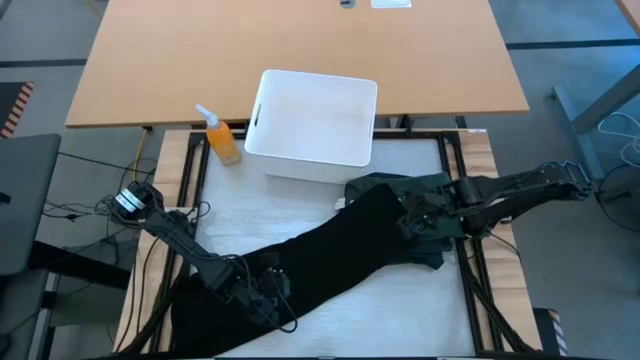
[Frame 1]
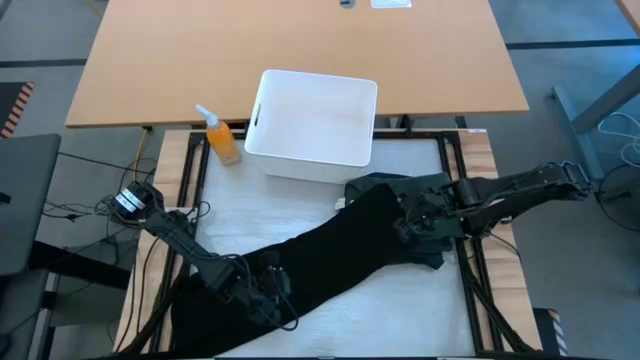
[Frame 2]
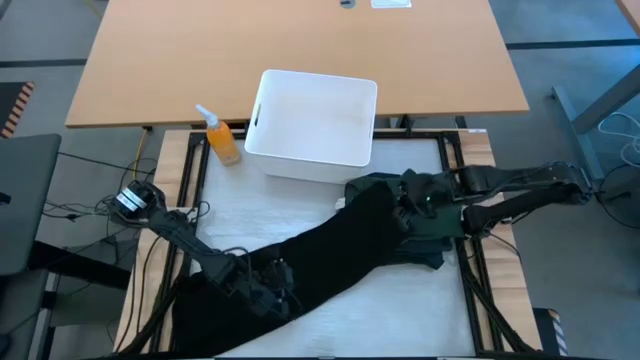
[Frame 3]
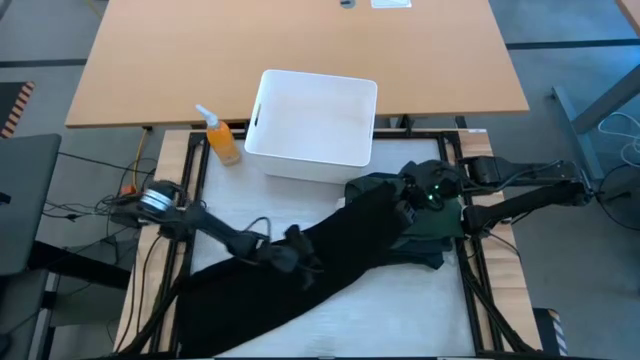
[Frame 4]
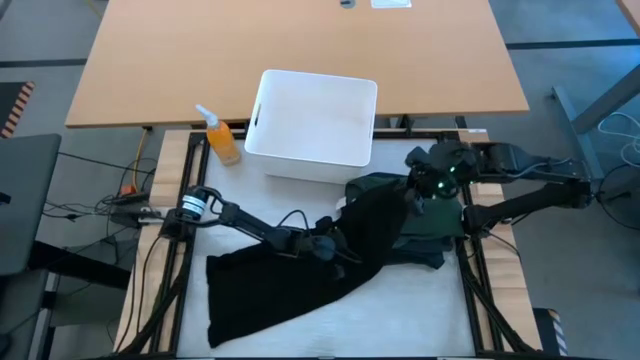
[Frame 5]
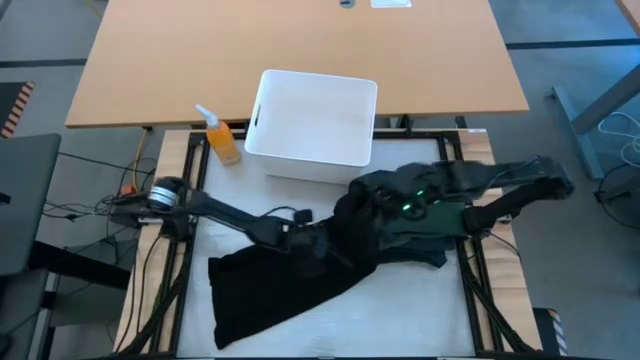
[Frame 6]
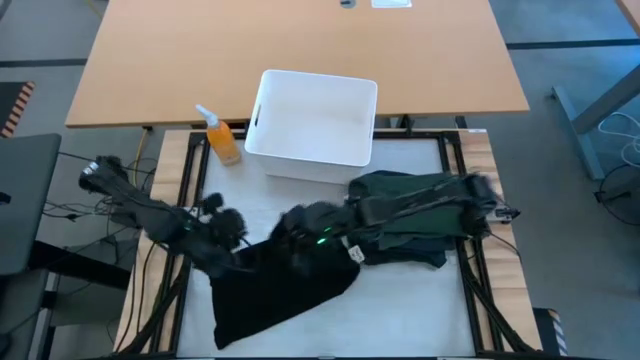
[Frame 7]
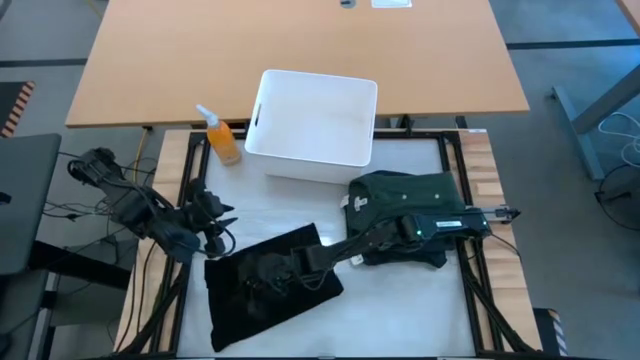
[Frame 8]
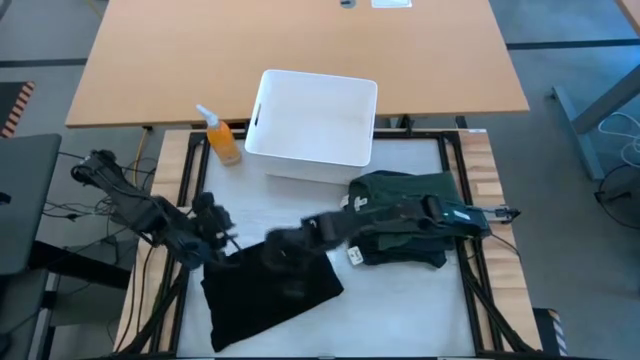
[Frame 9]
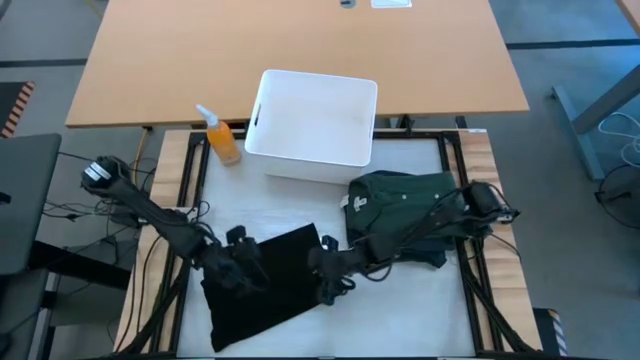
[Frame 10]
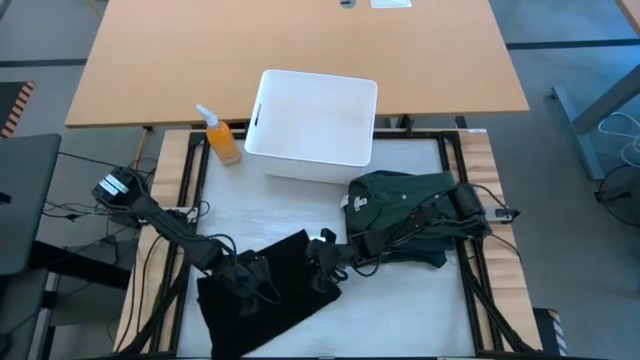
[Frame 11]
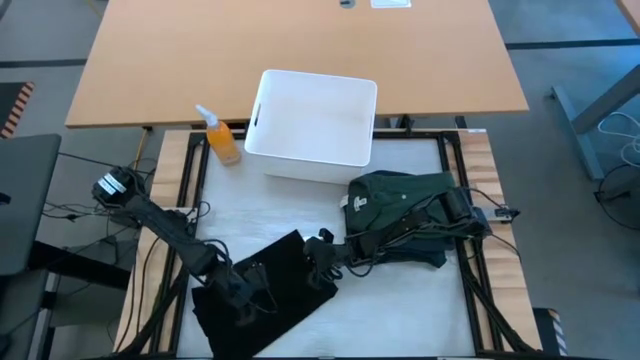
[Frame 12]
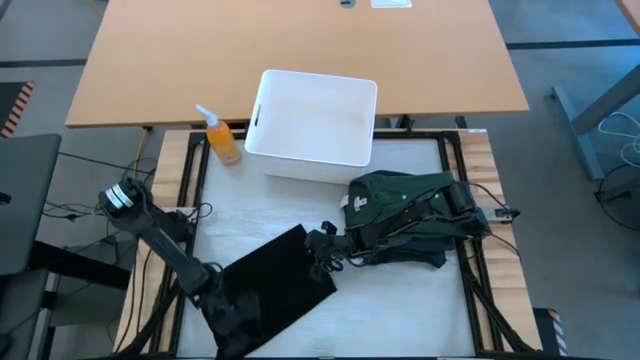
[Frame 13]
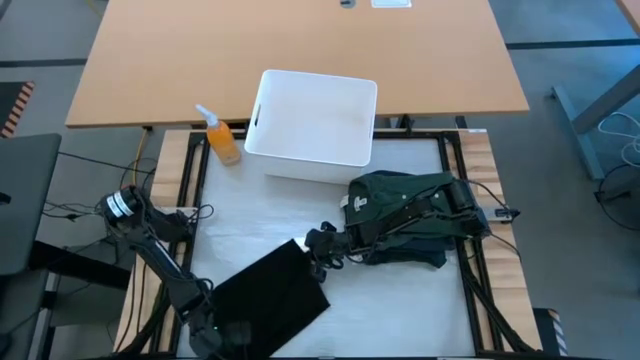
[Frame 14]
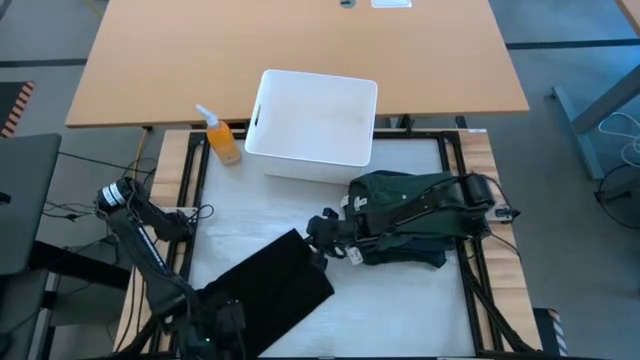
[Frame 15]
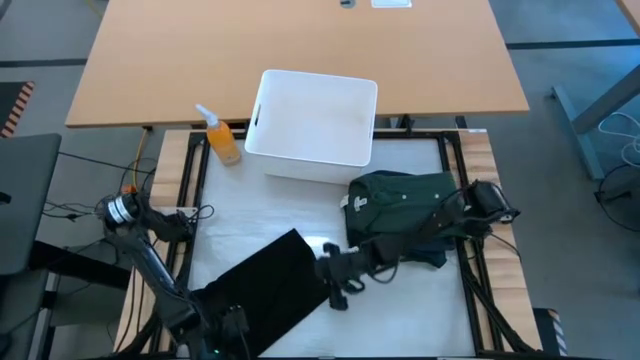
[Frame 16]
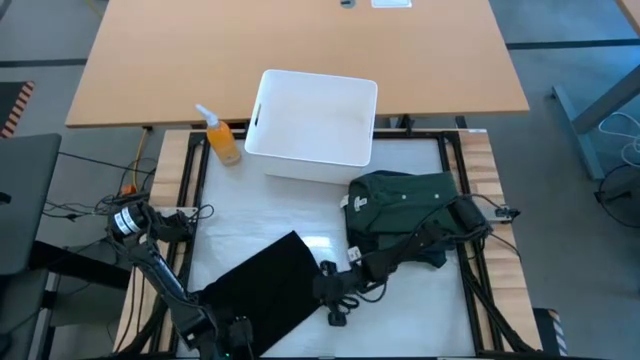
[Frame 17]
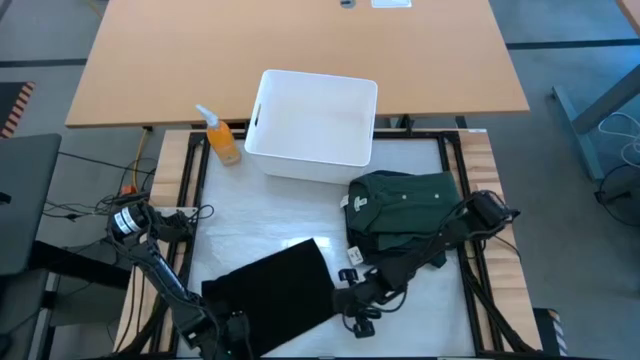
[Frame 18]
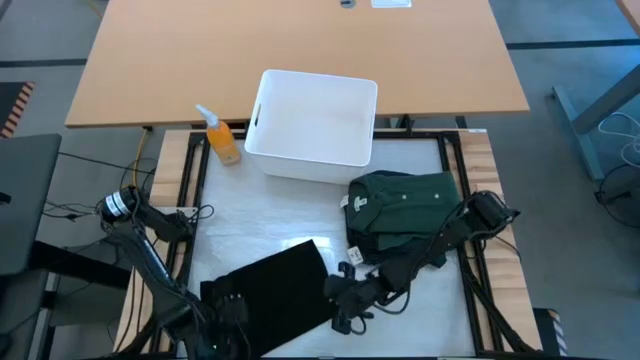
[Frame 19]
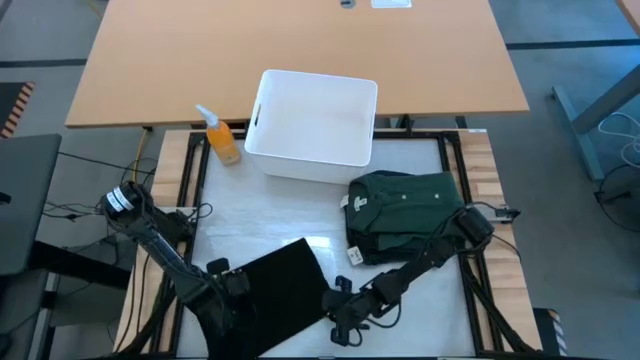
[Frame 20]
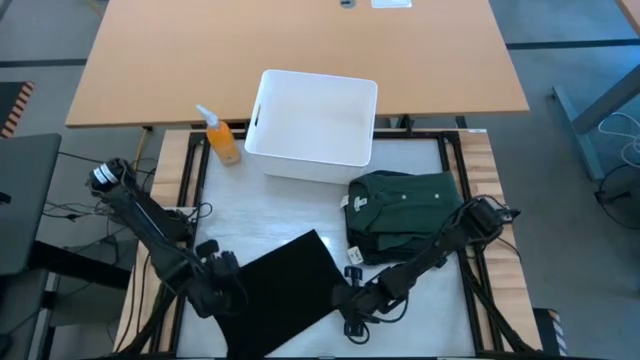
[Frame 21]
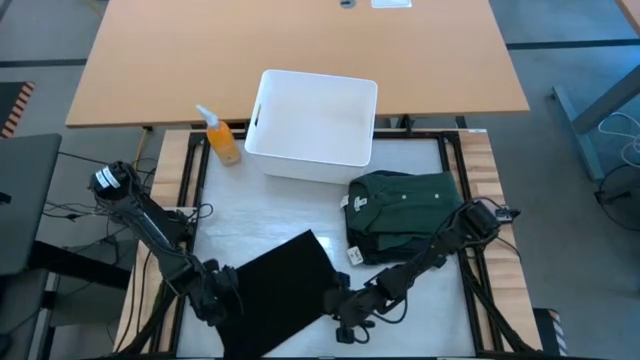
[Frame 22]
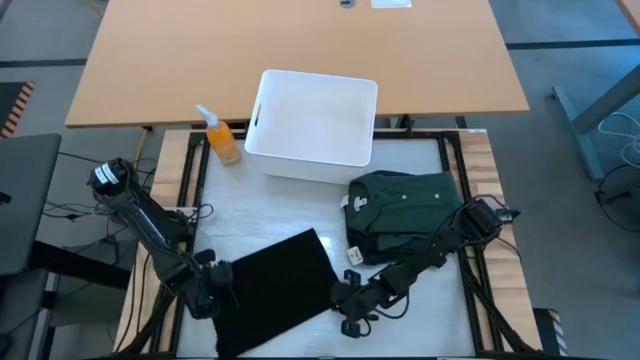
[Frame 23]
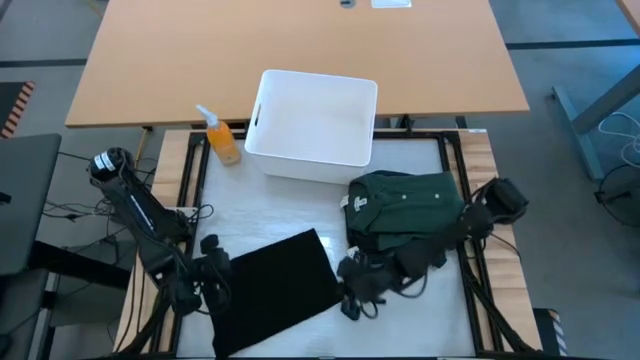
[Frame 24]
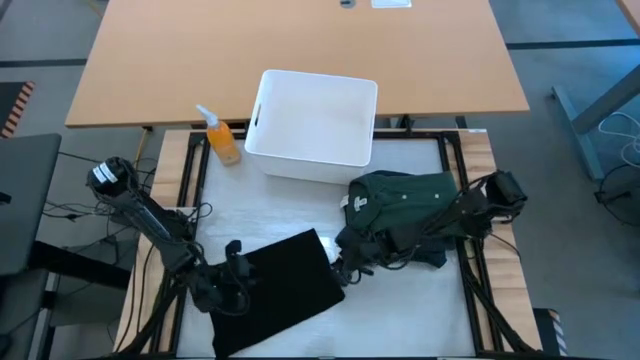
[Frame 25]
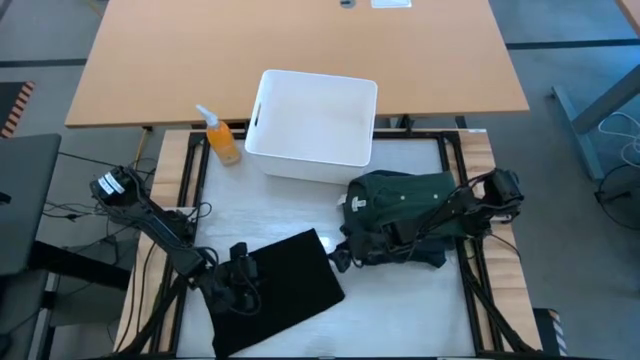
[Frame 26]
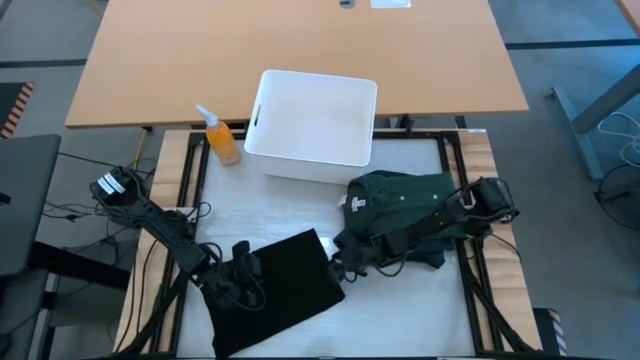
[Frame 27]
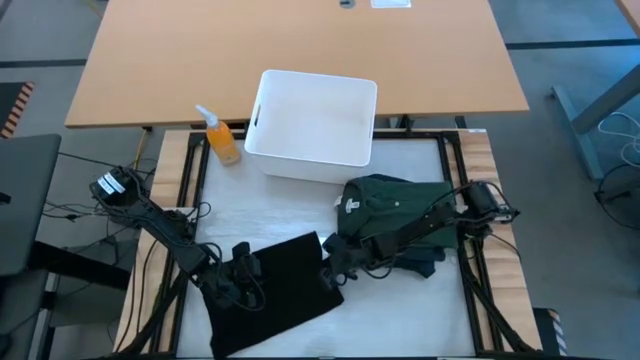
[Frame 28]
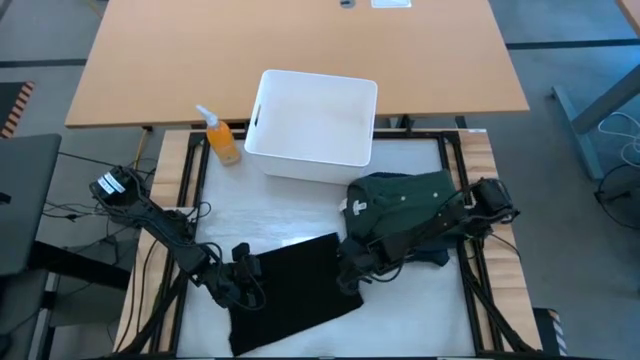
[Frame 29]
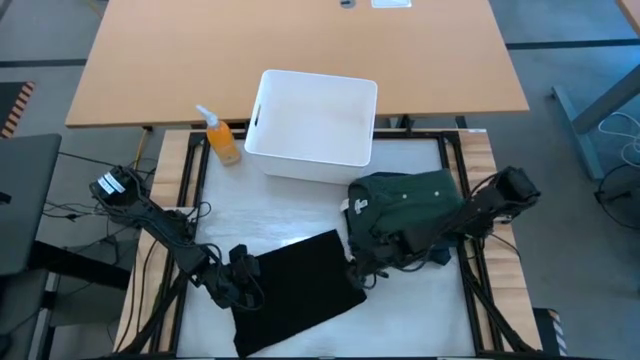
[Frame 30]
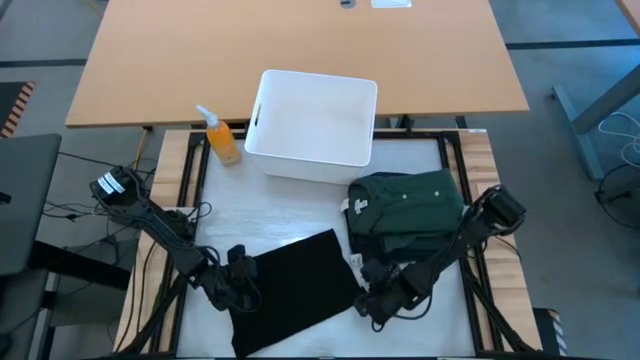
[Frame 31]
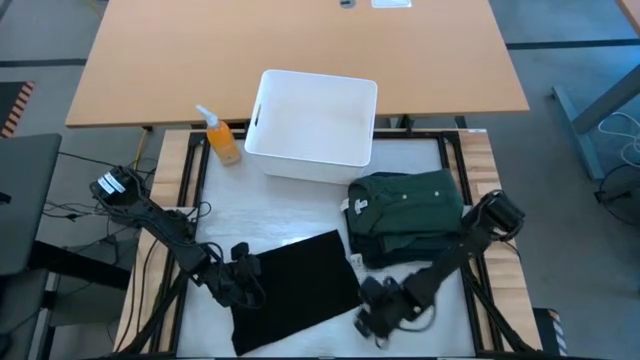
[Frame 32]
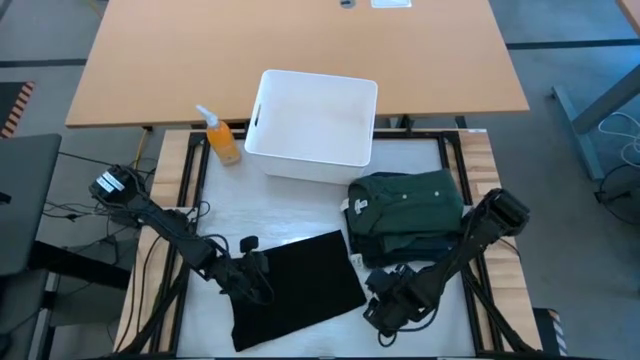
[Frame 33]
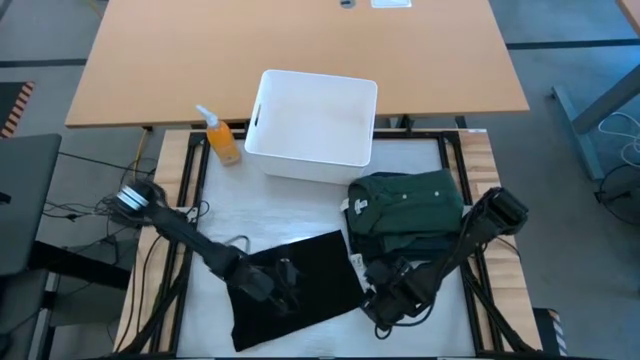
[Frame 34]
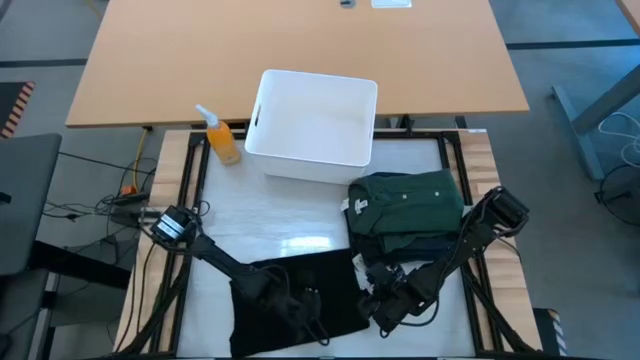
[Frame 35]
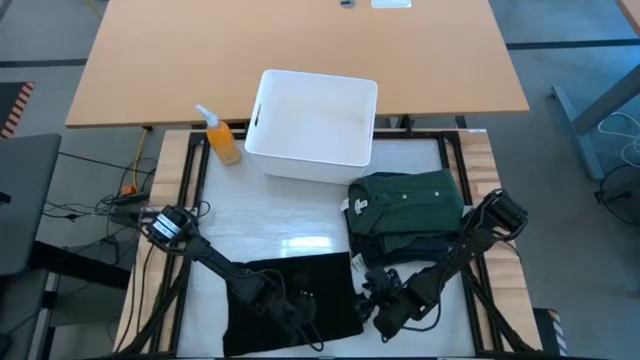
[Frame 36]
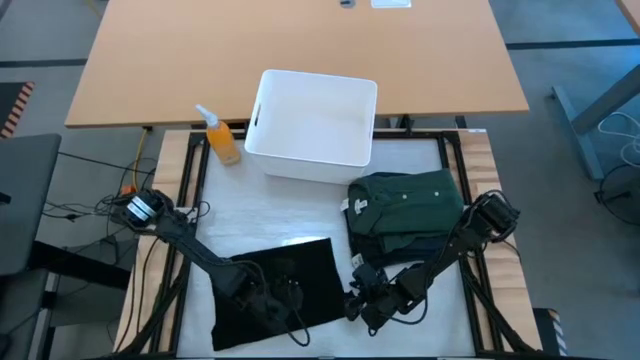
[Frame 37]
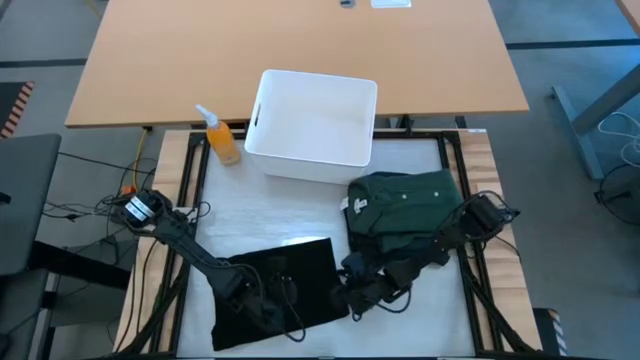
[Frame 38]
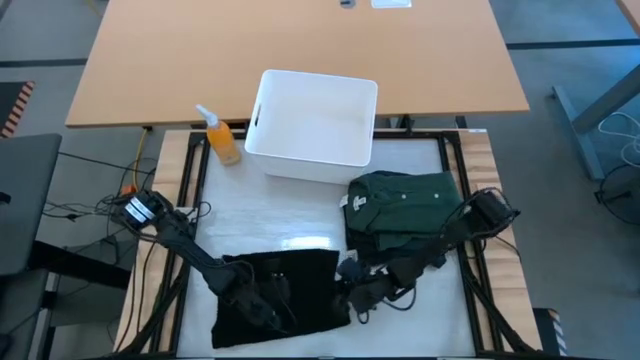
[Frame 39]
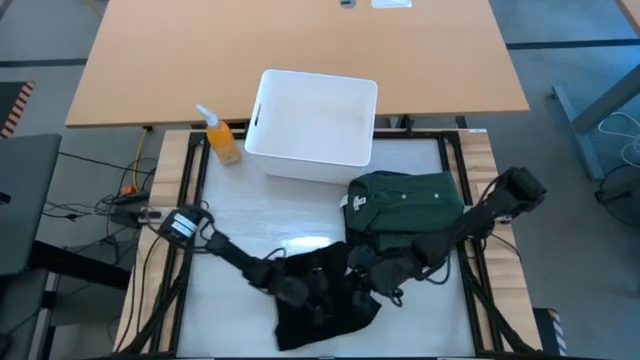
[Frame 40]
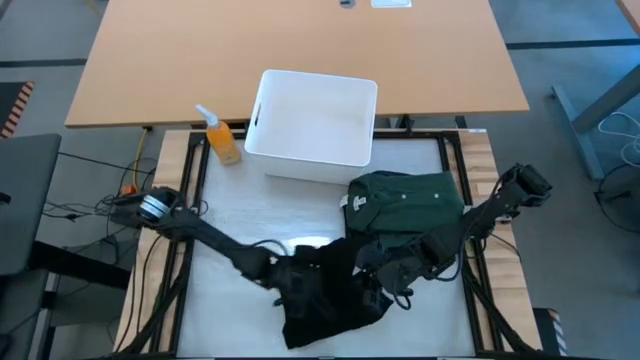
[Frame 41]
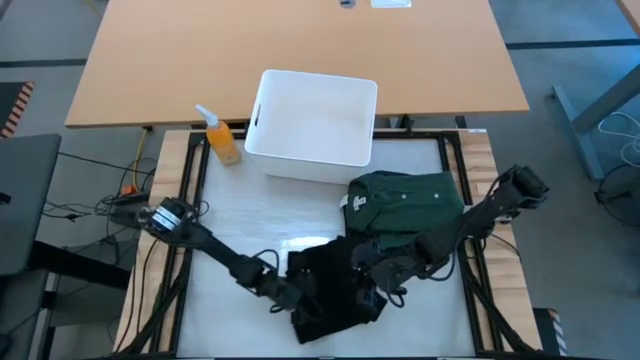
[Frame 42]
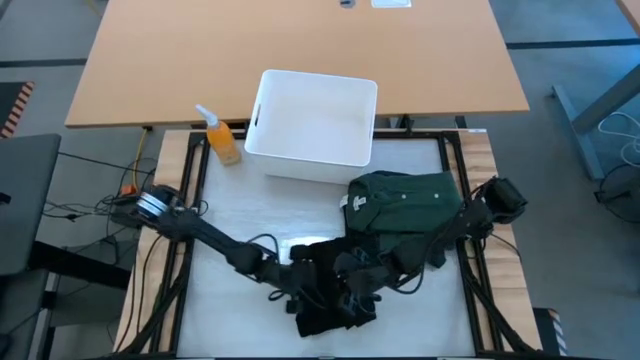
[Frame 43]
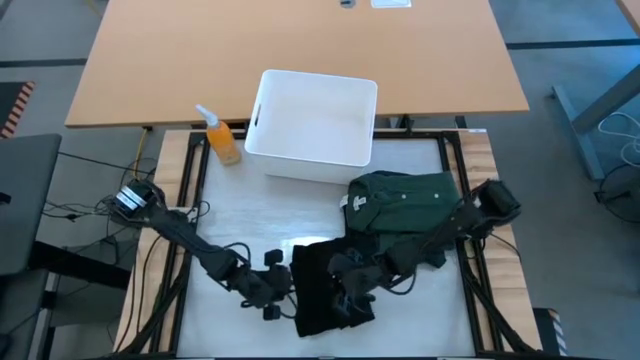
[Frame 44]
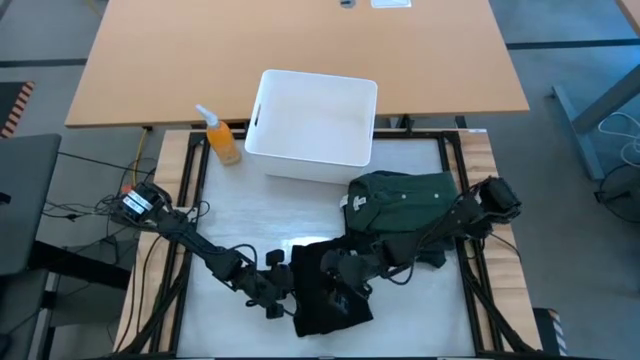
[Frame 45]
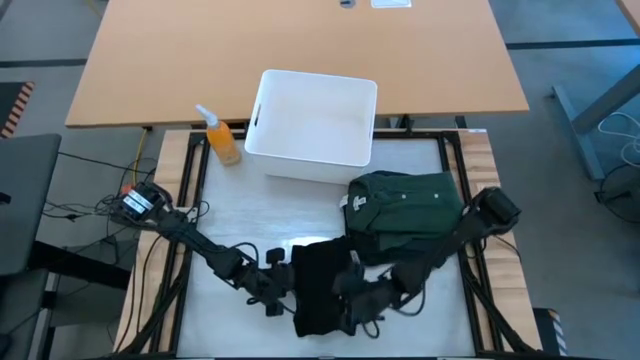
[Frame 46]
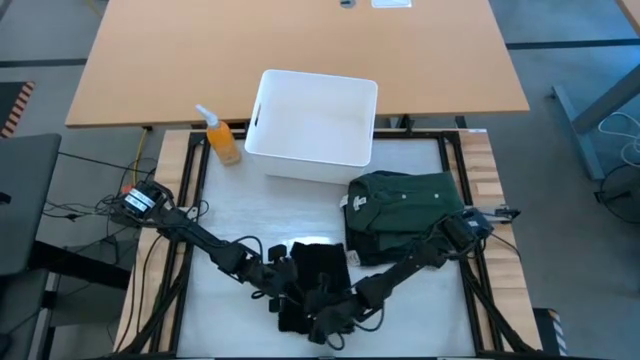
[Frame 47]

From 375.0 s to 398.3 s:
Task: Fold laundry
Fold the black shirt from the white laundry organizer
